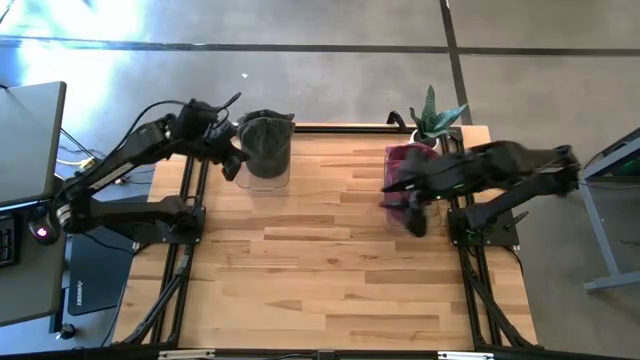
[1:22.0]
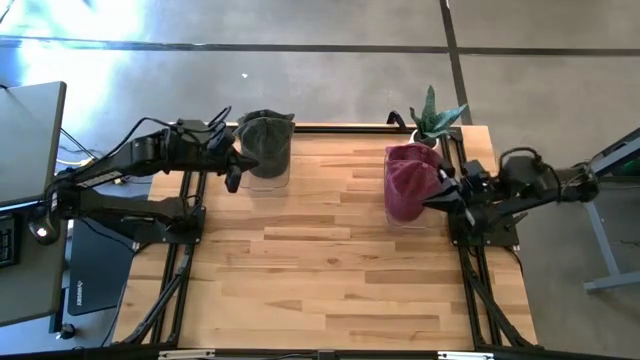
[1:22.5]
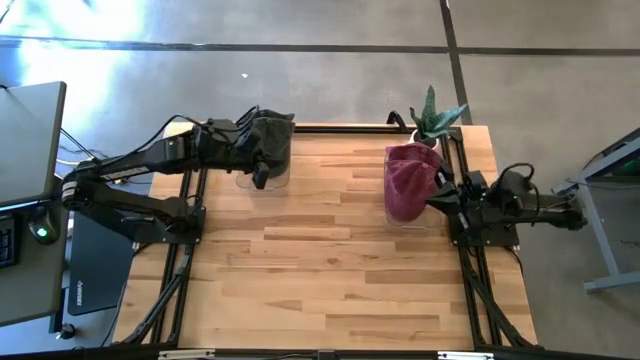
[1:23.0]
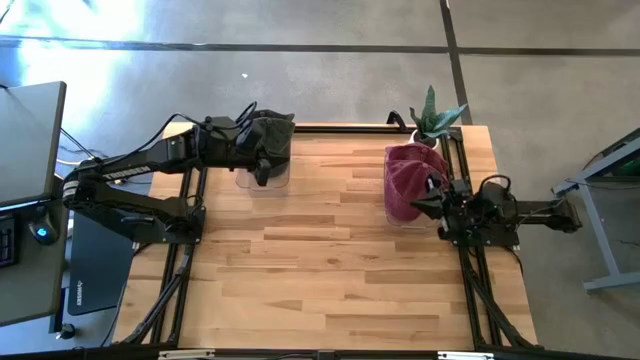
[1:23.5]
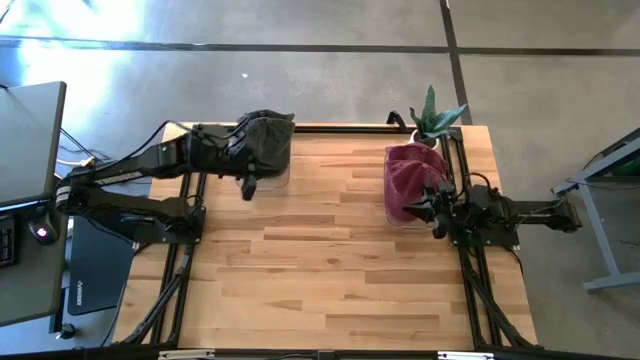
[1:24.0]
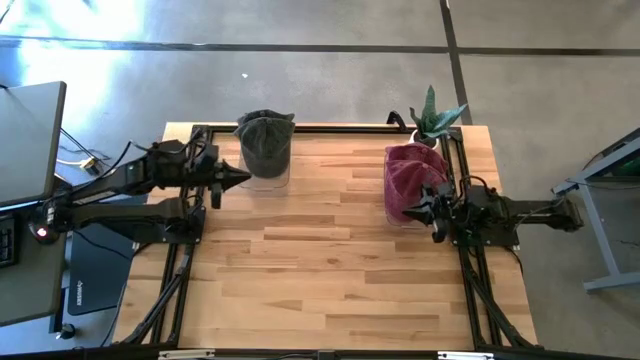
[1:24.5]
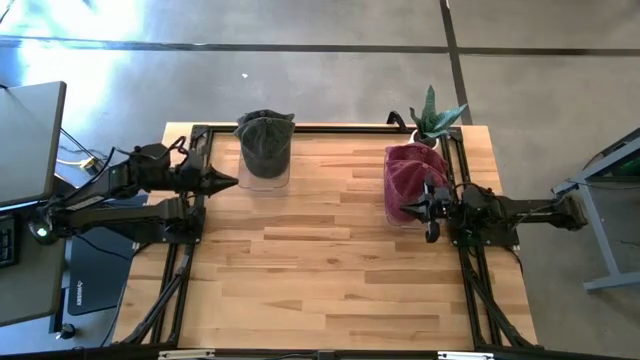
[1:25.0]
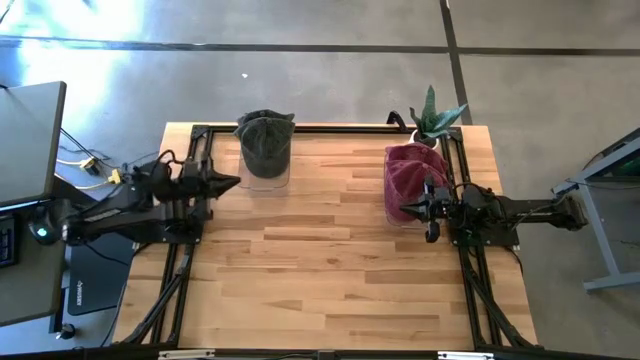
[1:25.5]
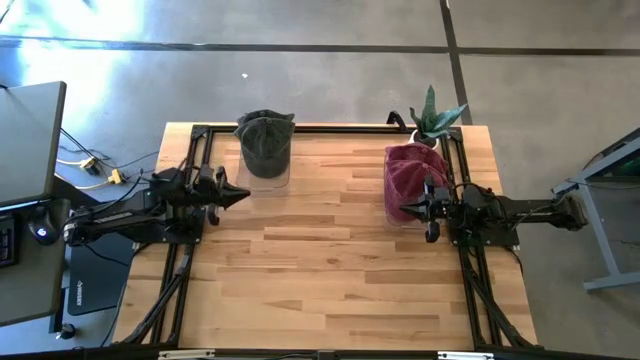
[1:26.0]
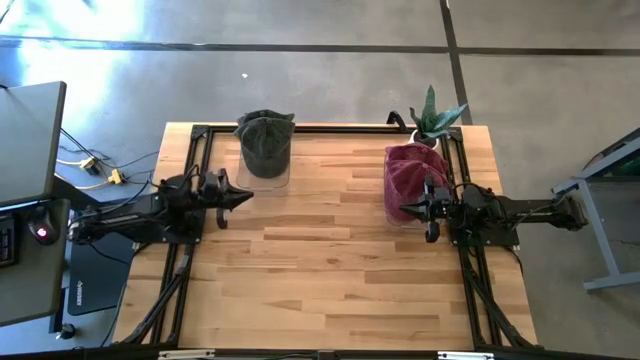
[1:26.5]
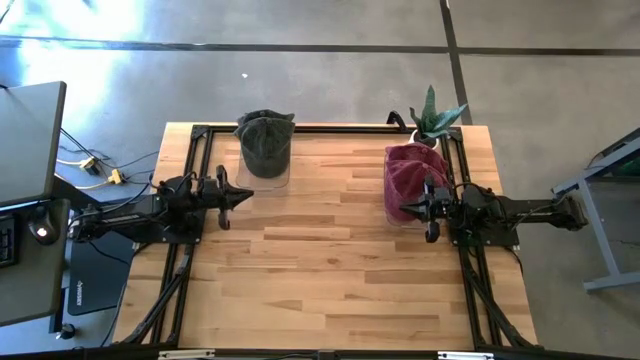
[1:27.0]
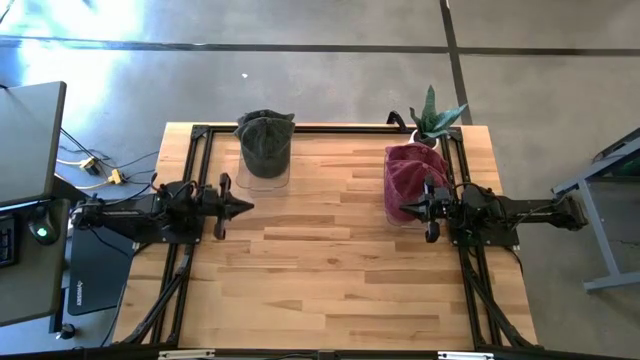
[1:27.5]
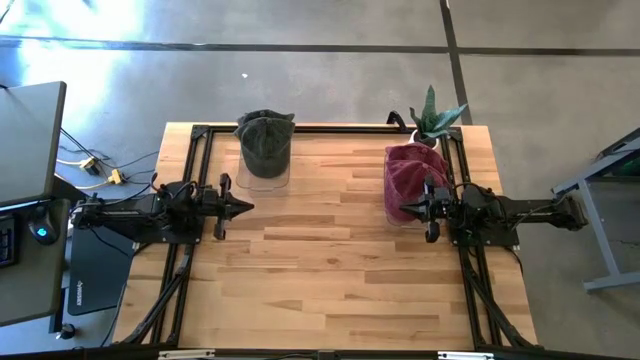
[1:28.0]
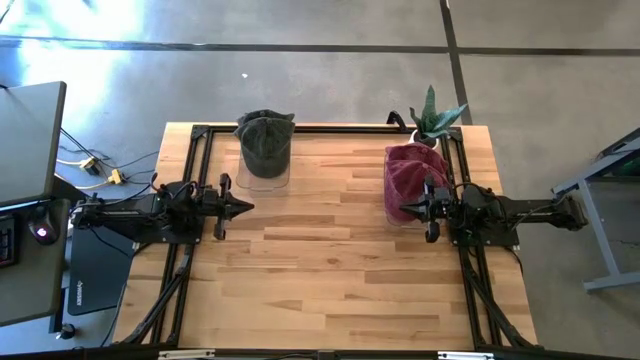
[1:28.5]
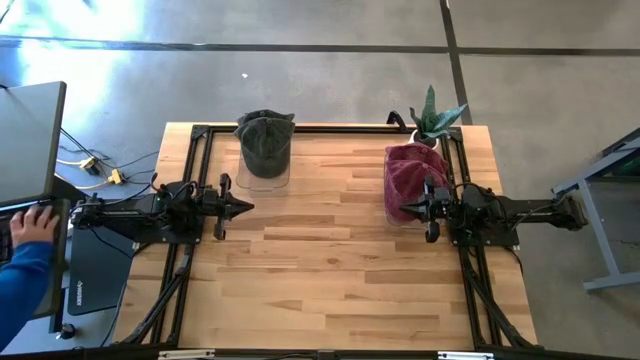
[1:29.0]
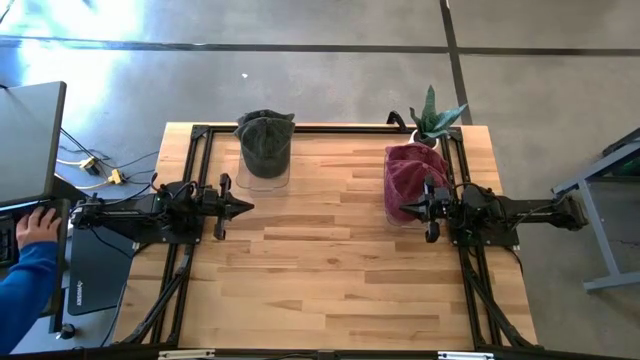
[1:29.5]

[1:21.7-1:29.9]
Task: Pick & Place hat
Return to Home Position

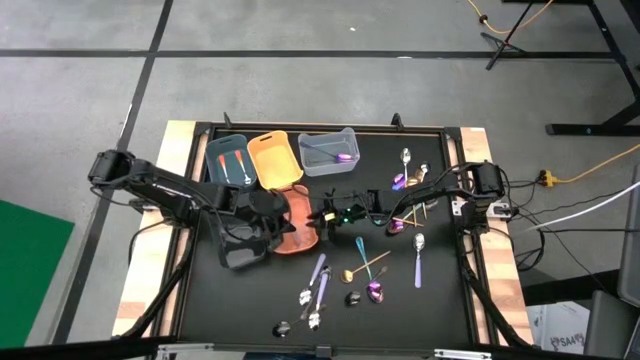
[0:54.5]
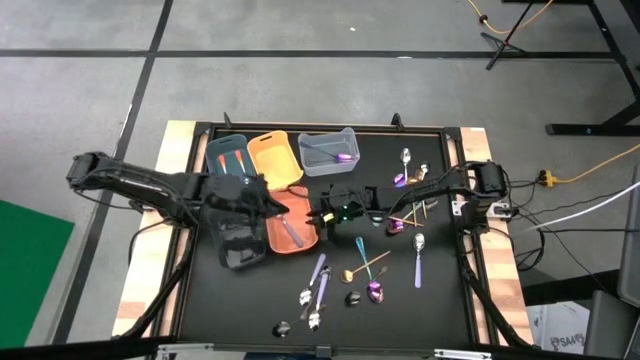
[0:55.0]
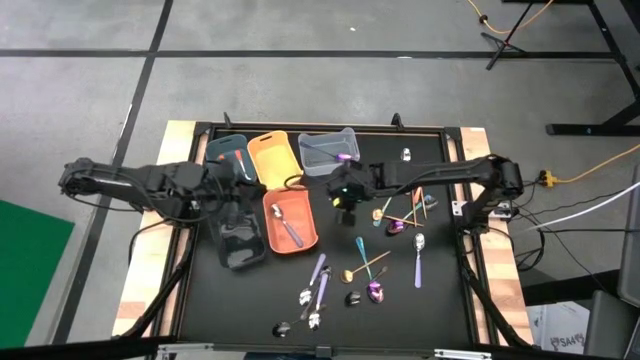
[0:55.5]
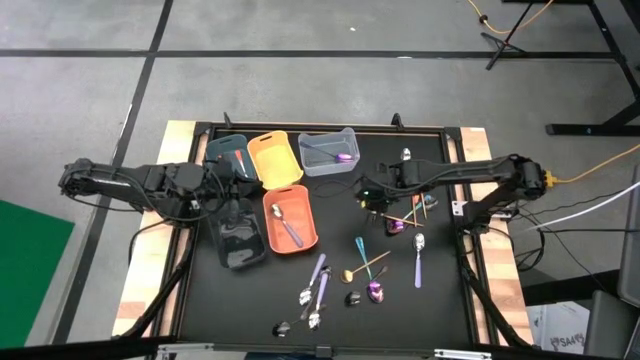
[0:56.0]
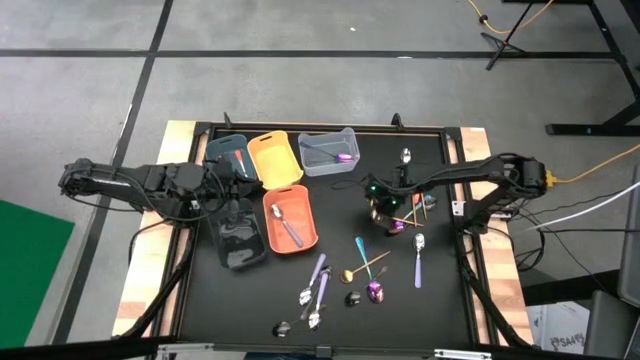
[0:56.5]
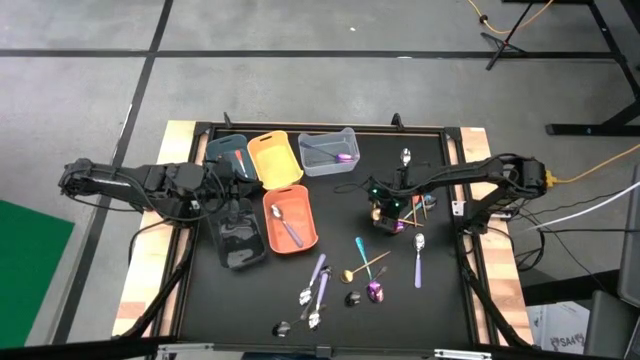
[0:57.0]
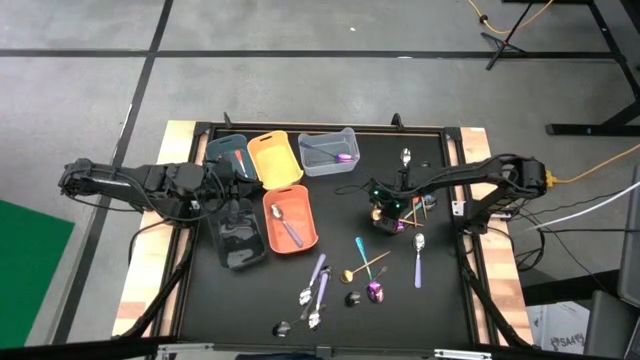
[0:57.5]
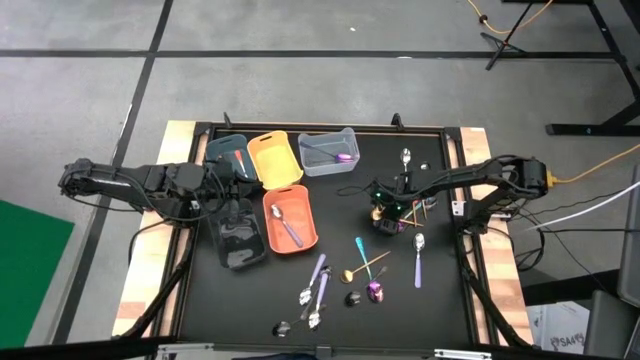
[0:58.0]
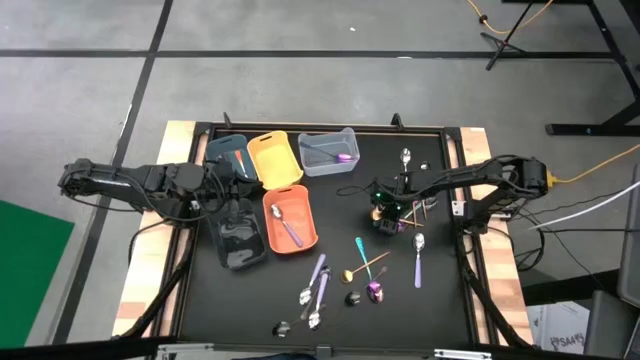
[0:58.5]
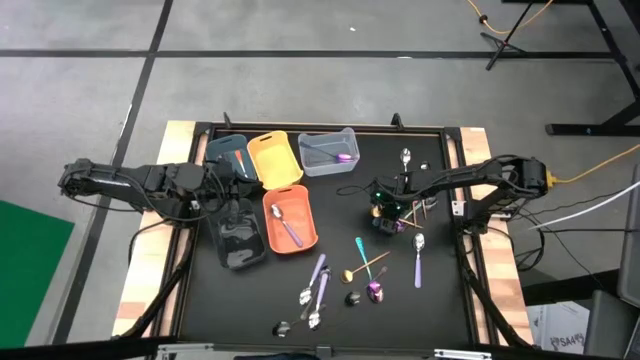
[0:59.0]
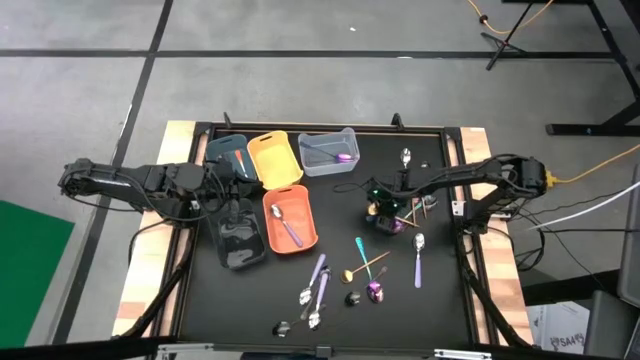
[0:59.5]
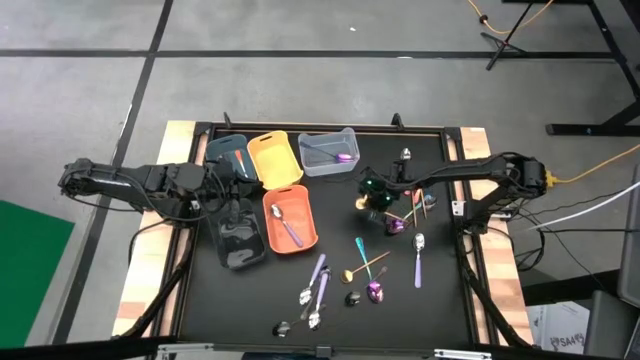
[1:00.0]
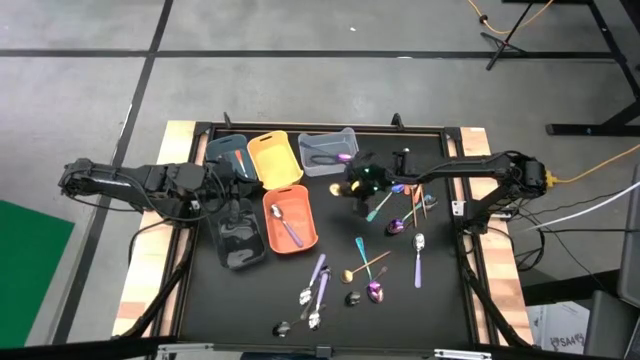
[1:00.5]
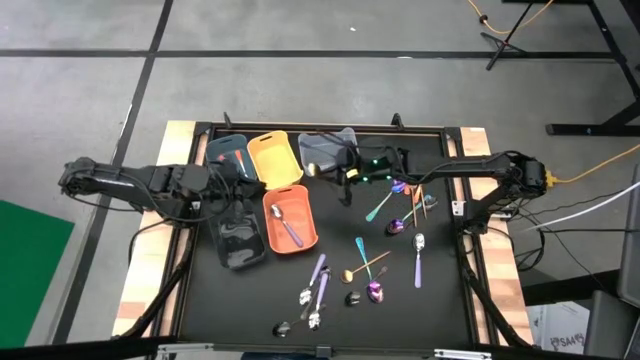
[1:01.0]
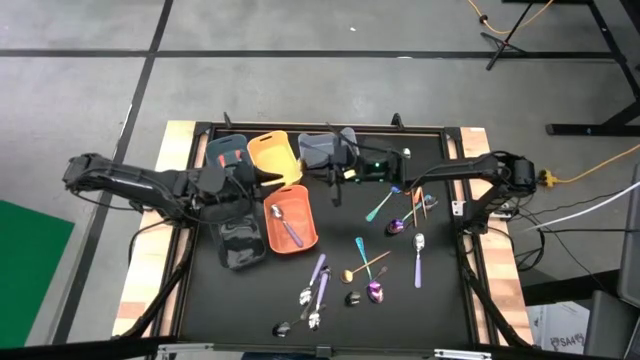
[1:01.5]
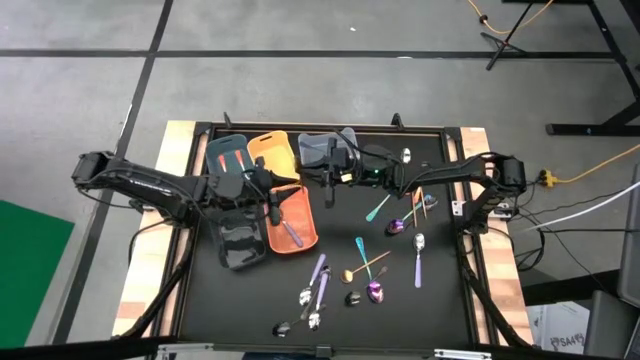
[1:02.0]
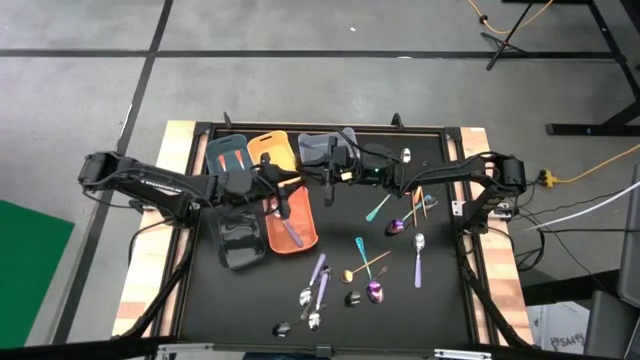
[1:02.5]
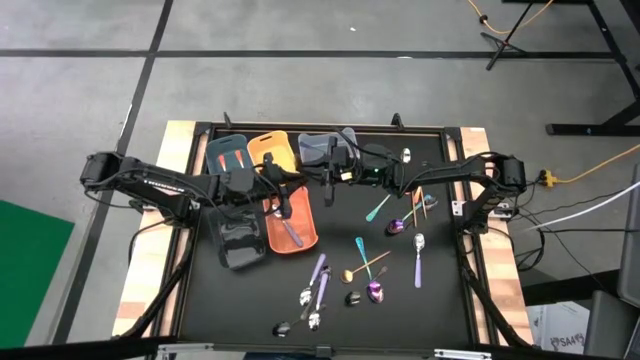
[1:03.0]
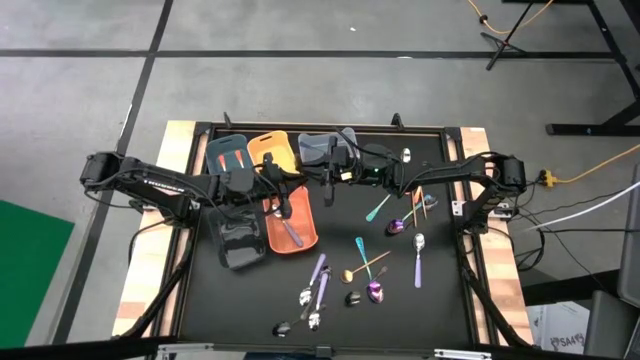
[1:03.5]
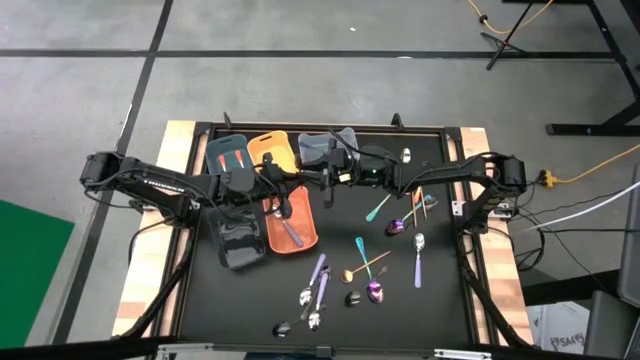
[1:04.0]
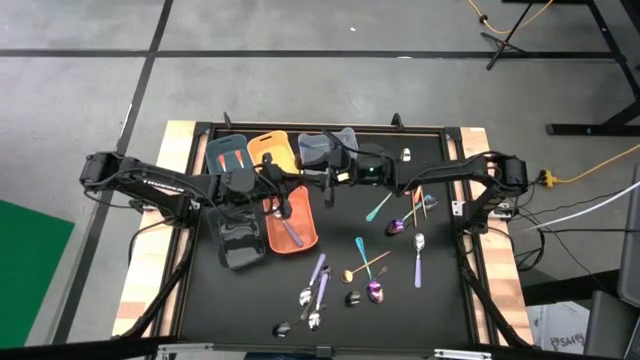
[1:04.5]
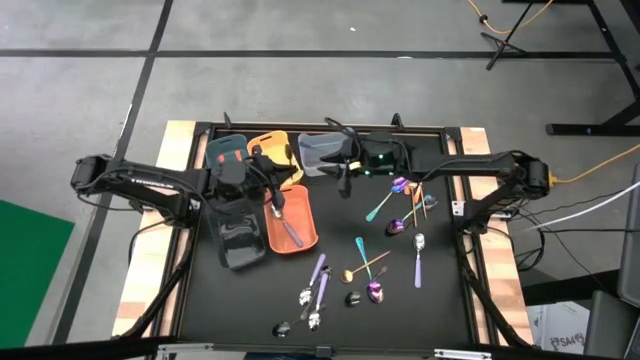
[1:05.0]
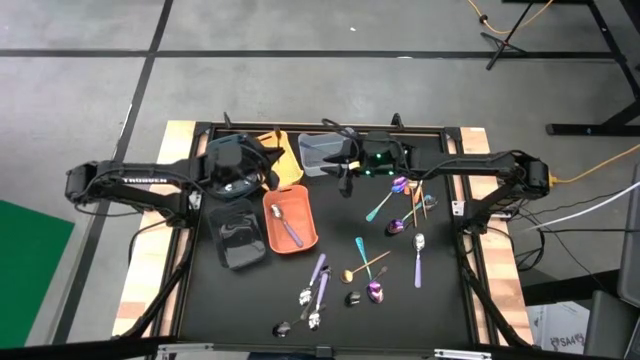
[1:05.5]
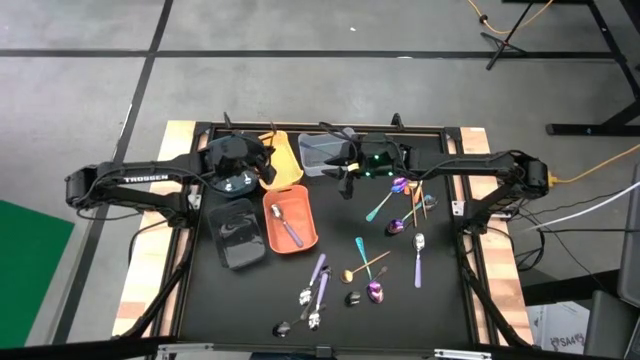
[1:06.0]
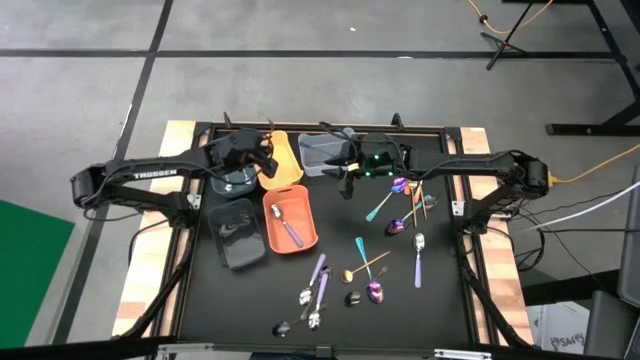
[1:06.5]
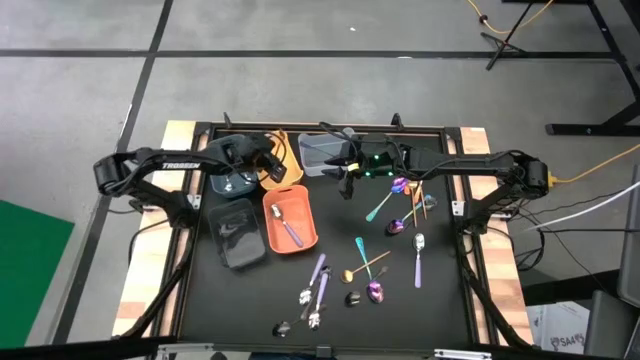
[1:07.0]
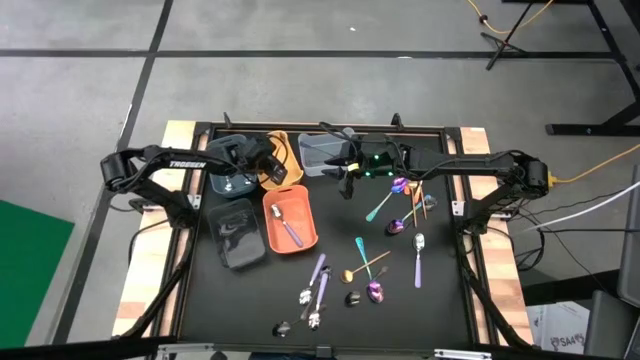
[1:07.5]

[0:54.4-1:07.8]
Task: Sort silverware by color (type)
Put the gold spoon into the yellow bin
